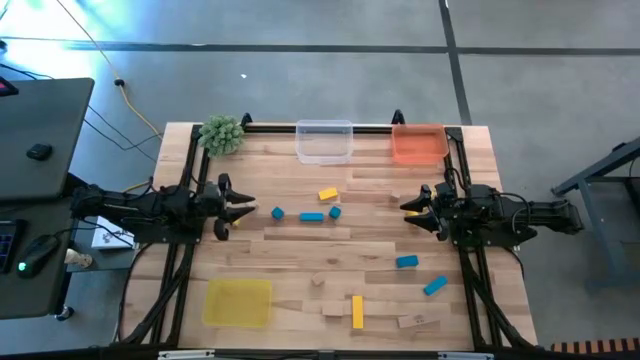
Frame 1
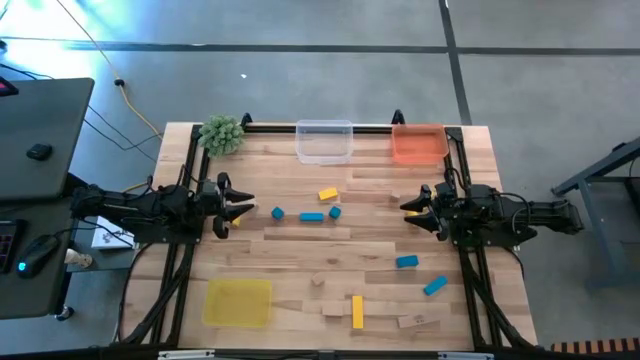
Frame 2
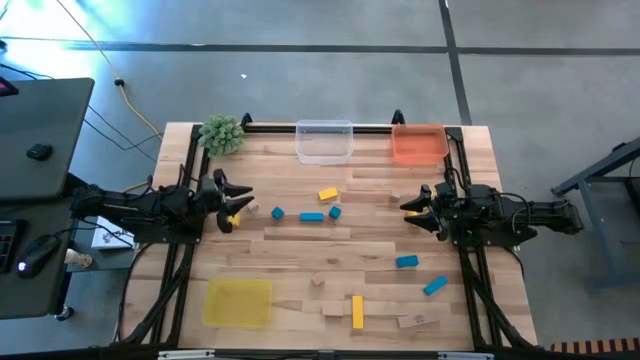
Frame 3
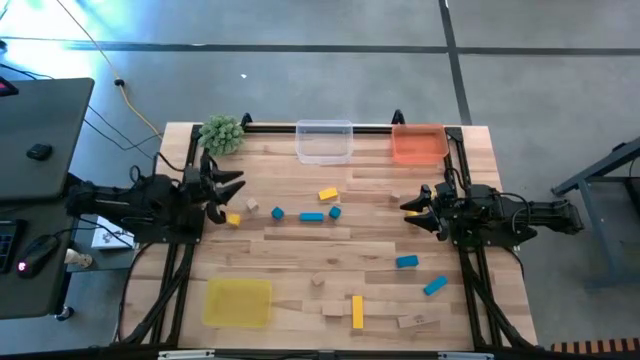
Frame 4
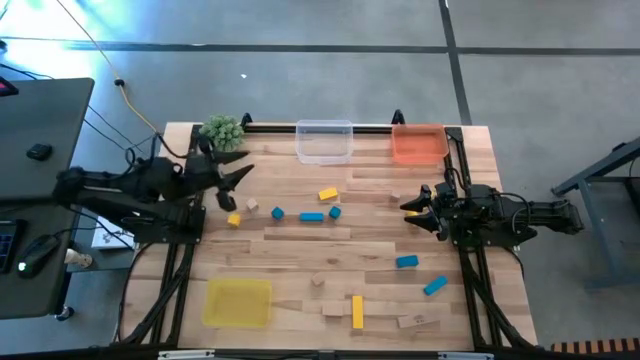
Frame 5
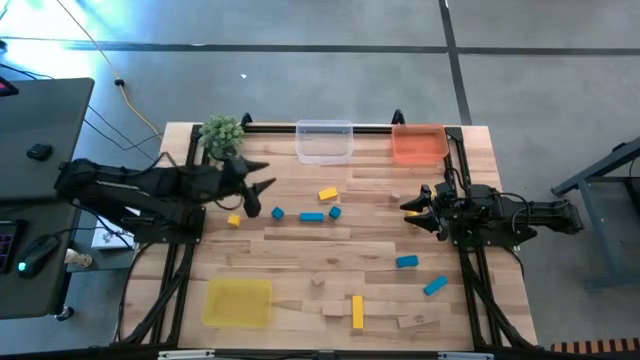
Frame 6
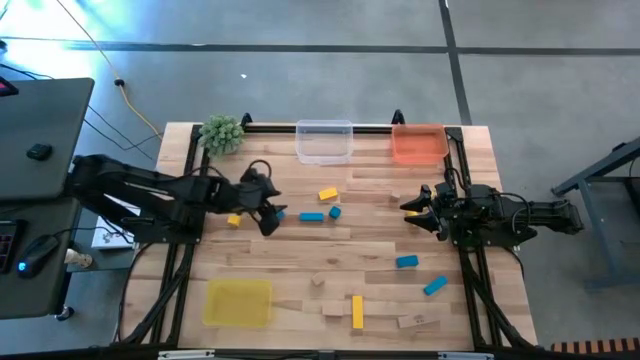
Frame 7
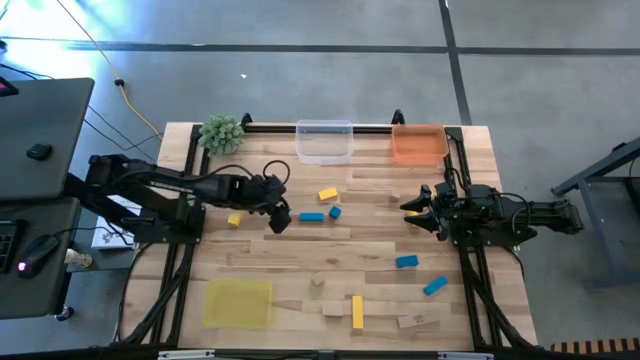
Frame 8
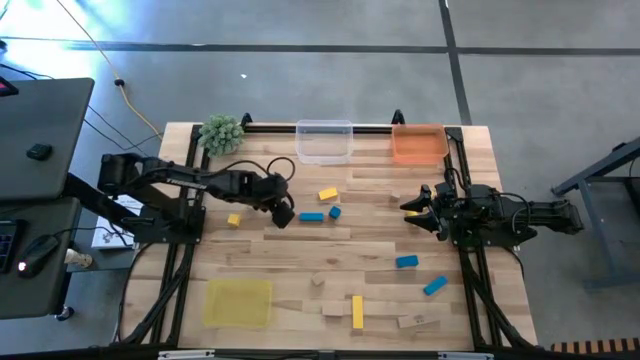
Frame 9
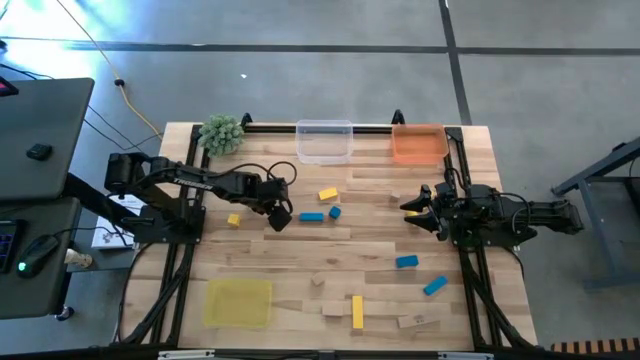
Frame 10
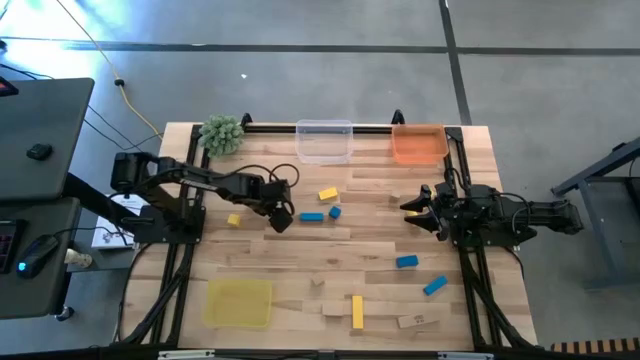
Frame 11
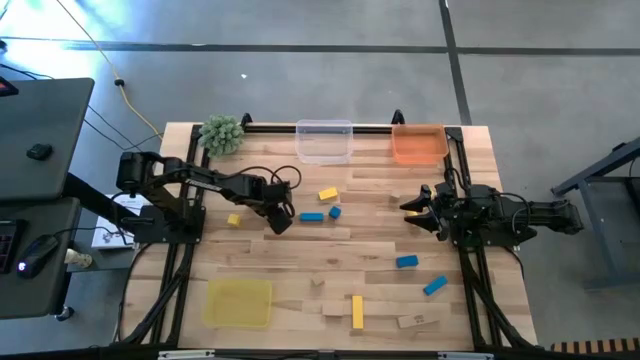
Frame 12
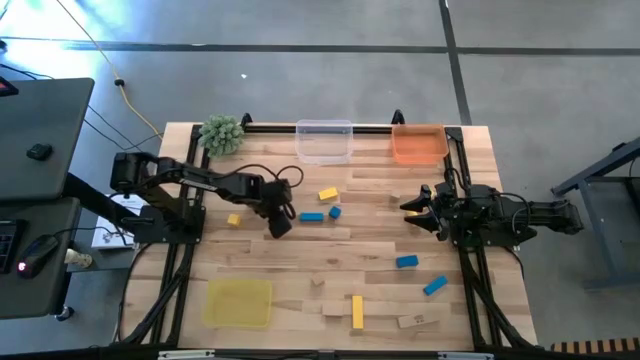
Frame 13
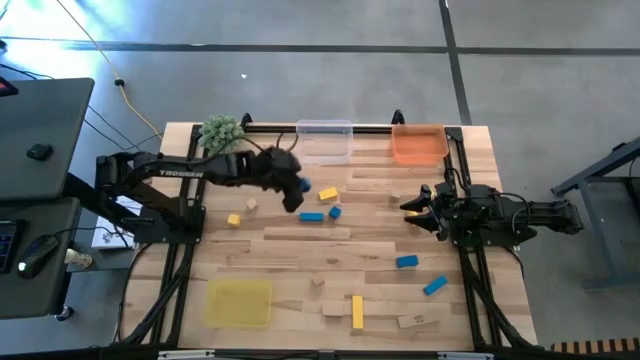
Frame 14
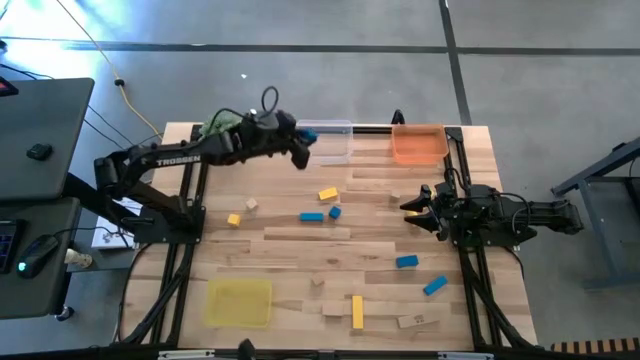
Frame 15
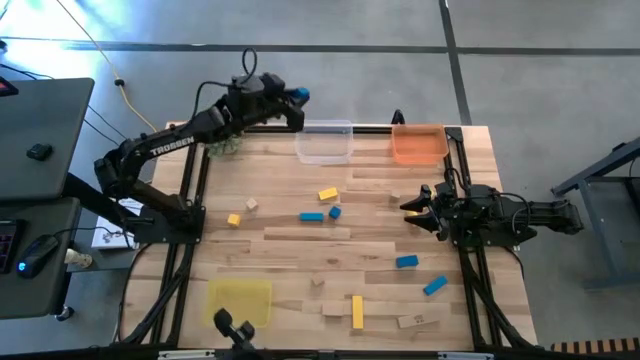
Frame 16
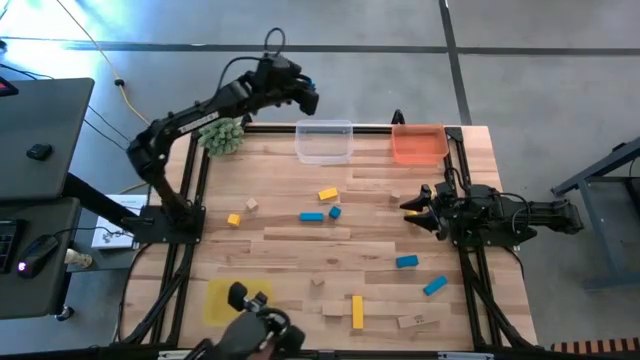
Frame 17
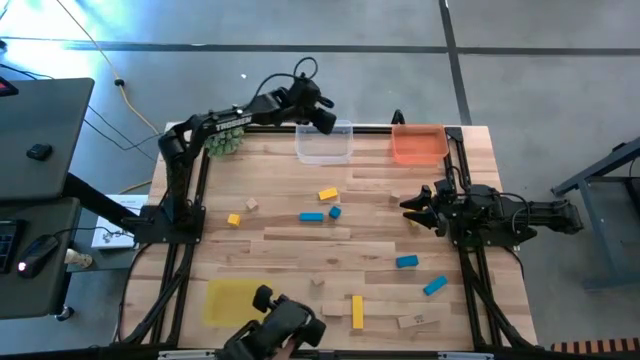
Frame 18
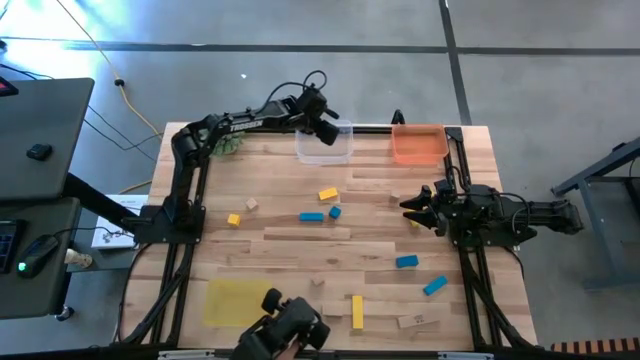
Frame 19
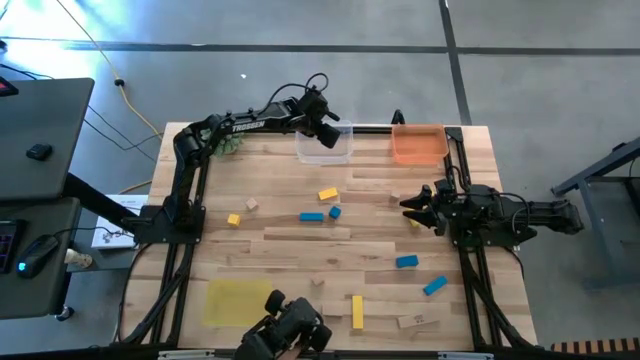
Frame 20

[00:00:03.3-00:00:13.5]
Task: Sort & place blocks by color
Put the blue block into the transparent bin

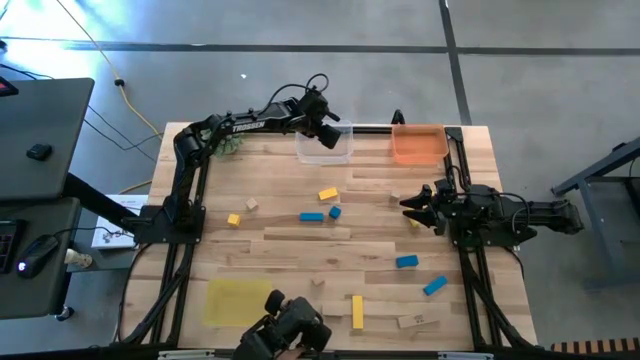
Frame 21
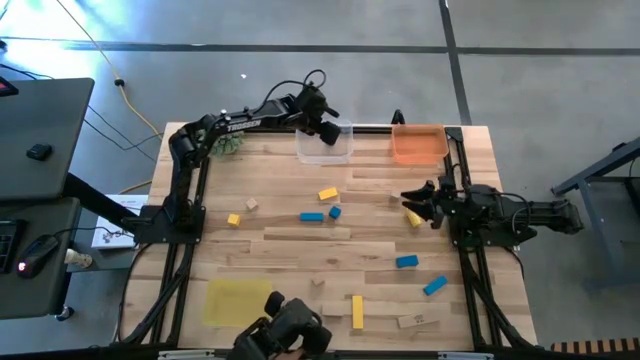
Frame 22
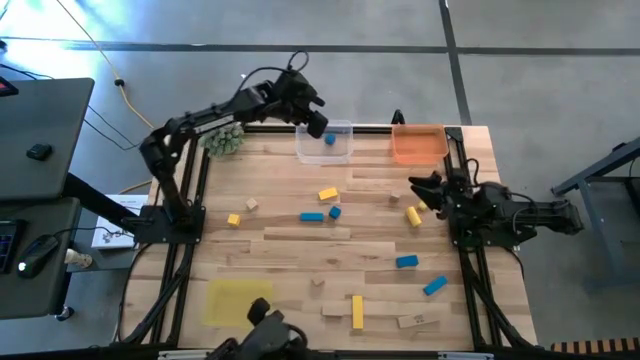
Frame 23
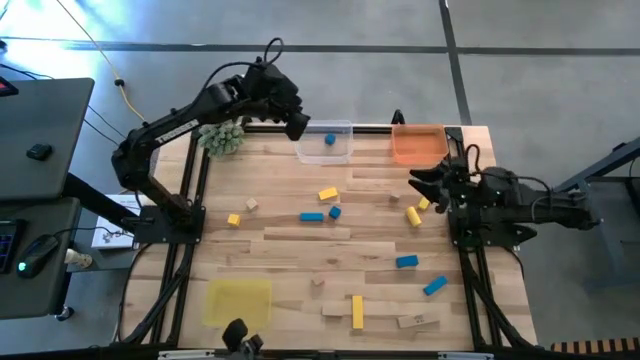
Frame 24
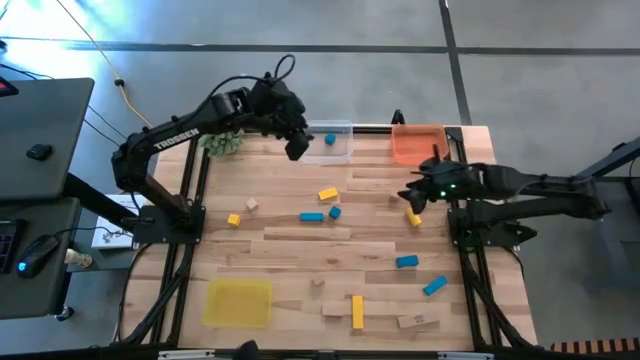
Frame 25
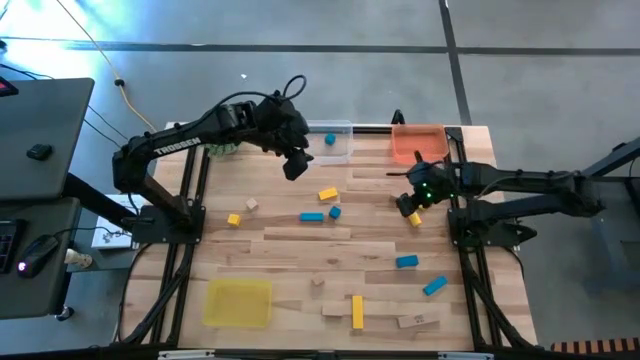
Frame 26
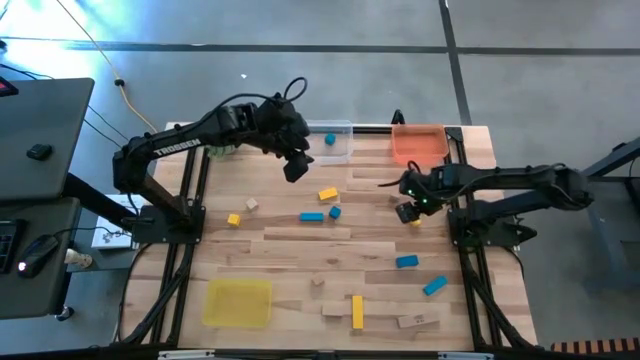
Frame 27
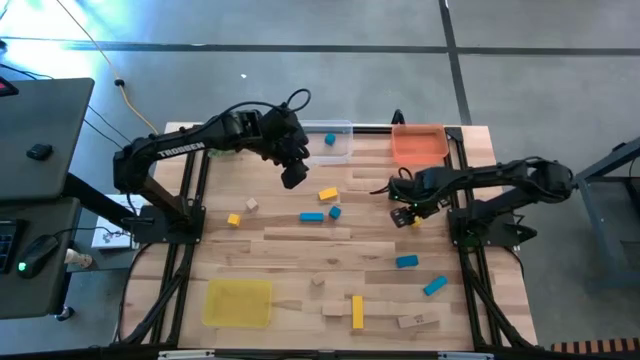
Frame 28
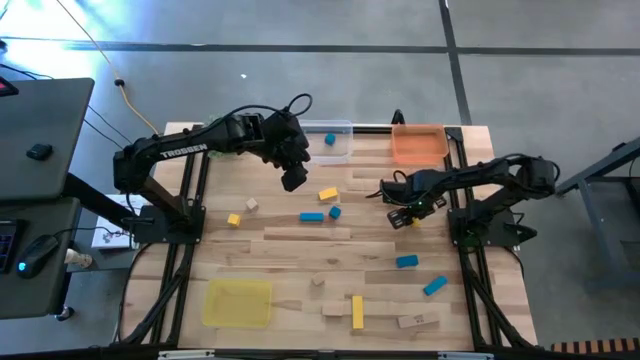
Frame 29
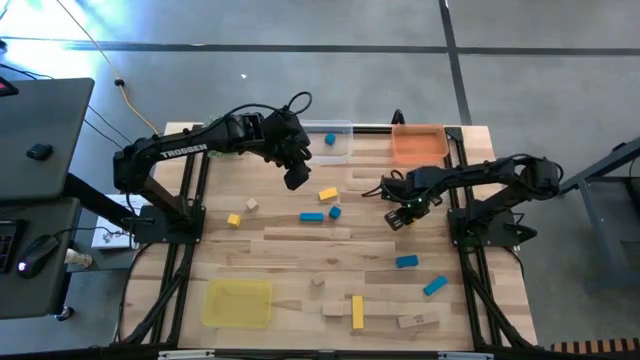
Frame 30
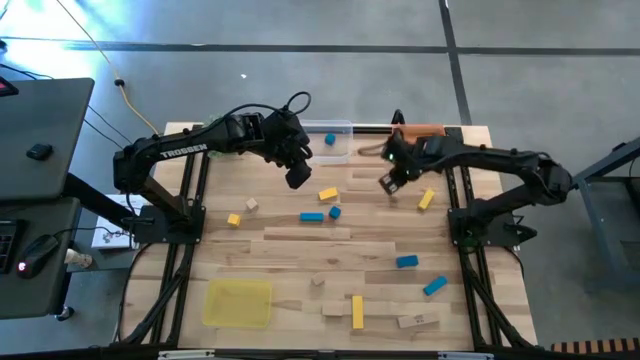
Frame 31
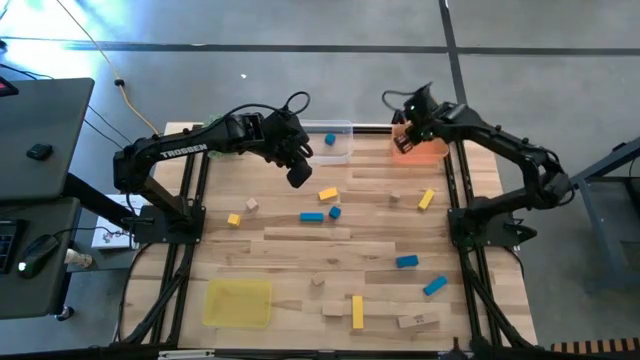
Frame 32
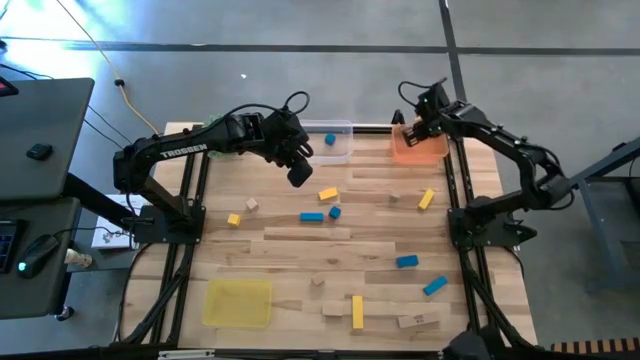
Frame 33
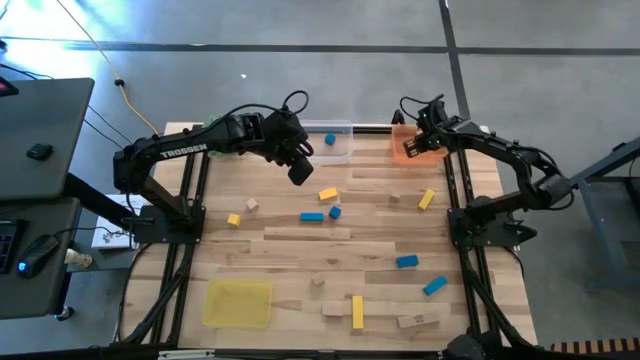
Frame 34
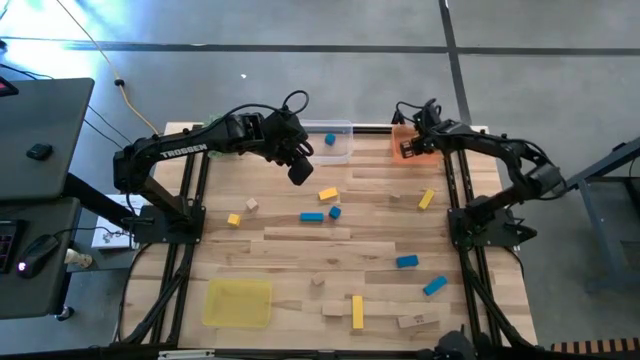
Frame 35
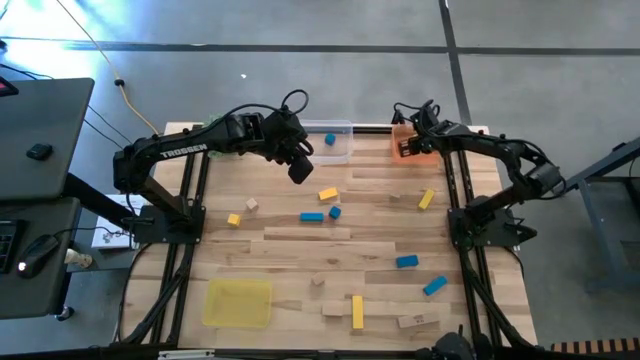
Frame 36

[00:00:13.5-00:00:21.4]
Put the yellow block into the orange bin

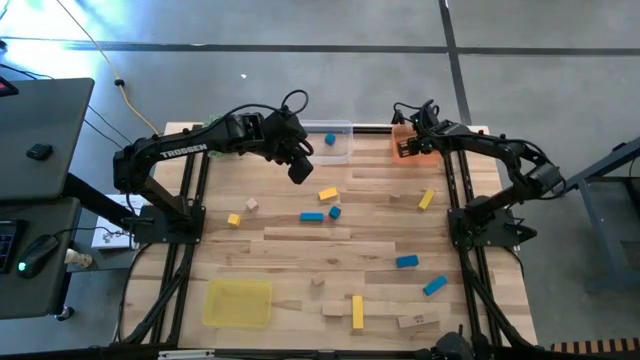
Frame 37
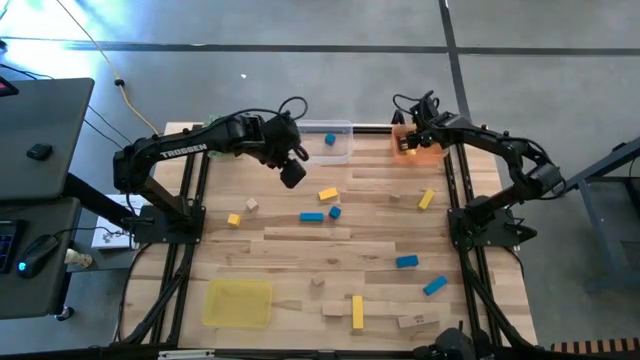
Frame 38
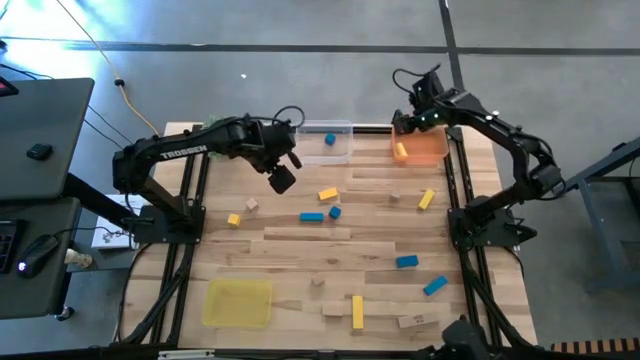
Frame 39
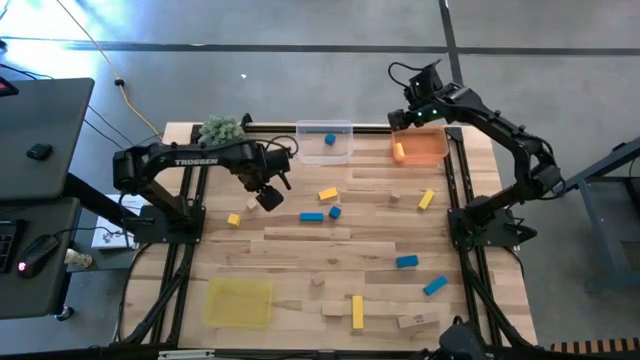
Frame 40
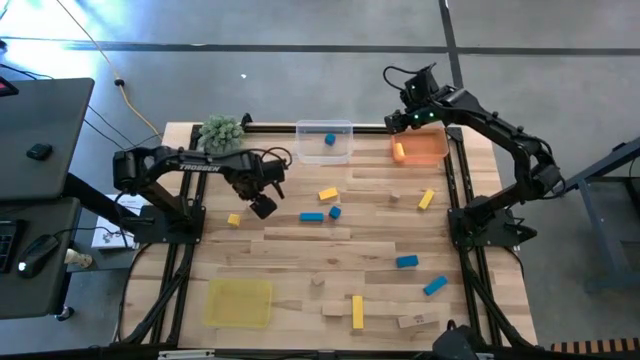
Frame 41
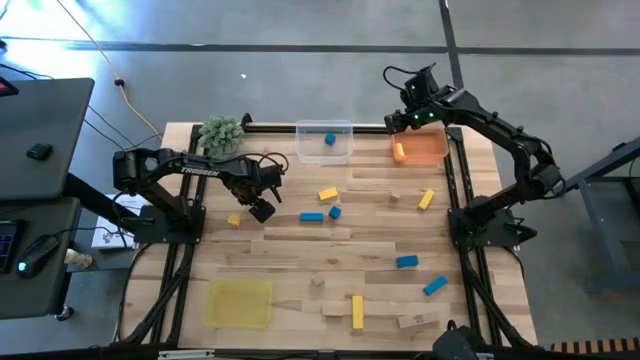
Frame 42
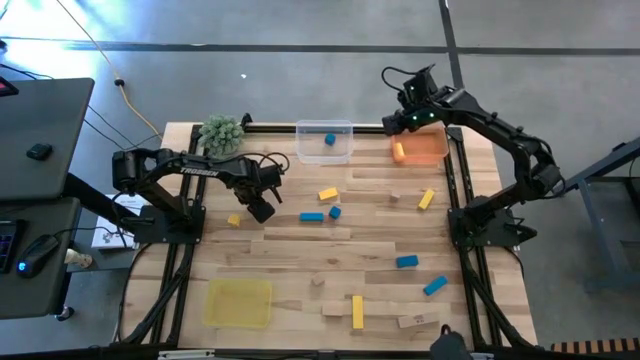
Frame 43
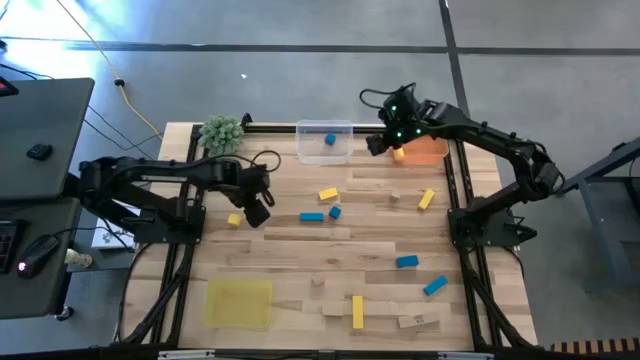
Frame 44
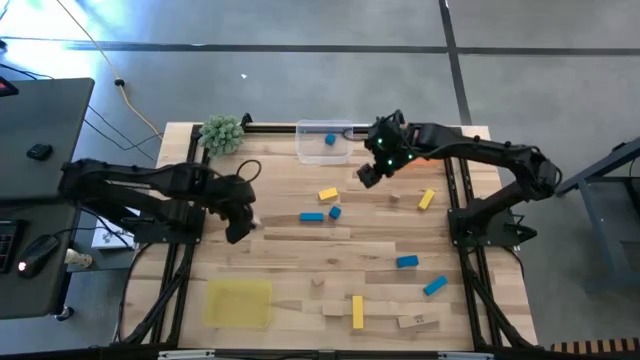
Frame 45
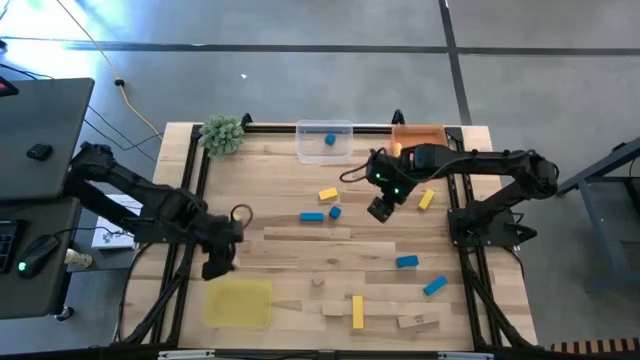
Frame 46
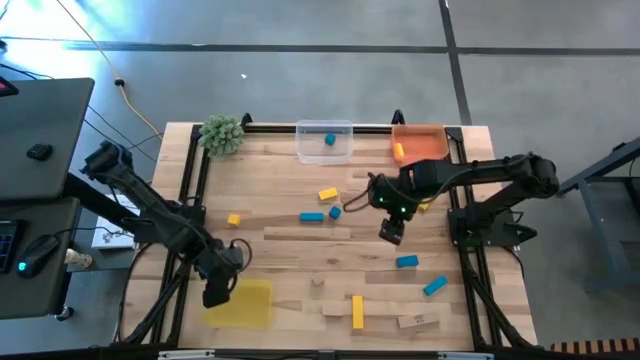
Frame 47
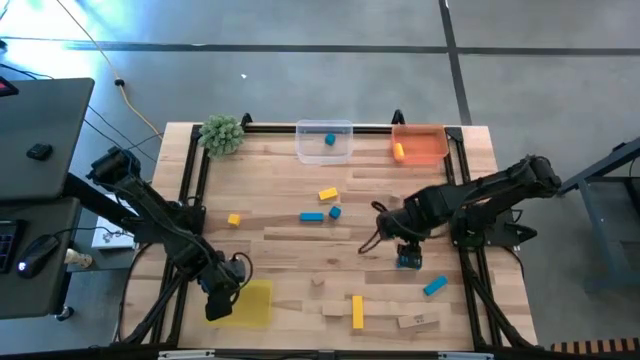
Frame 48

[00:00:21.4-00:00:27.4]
Put the brown block into the yellow bin
